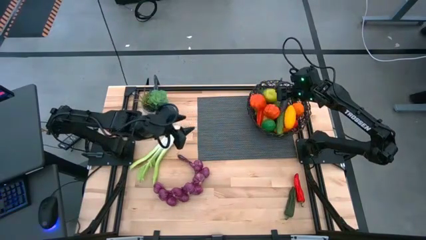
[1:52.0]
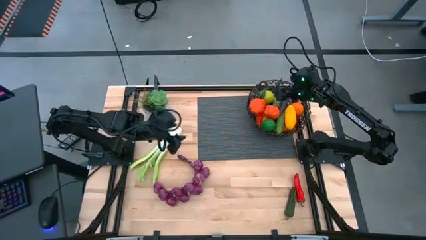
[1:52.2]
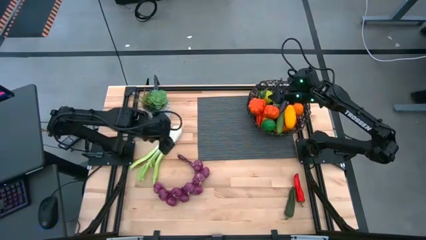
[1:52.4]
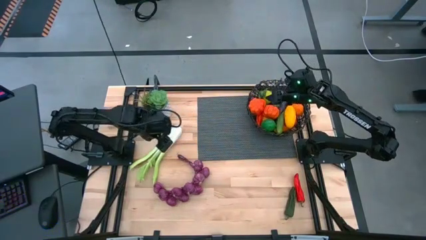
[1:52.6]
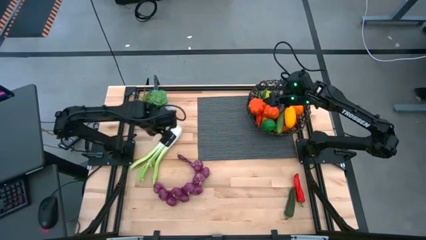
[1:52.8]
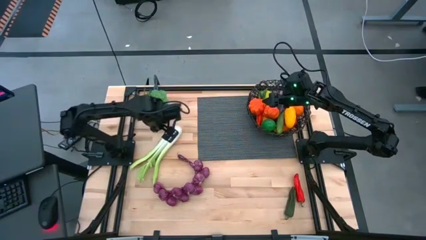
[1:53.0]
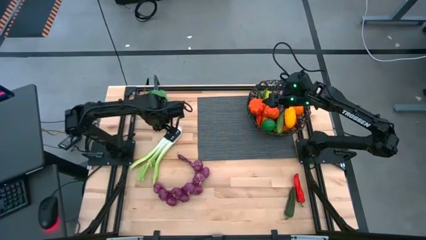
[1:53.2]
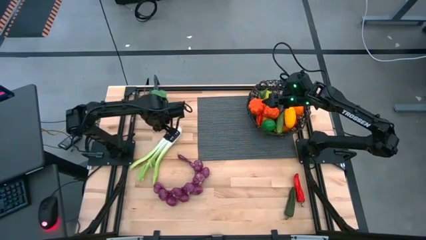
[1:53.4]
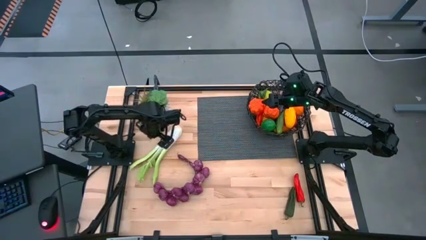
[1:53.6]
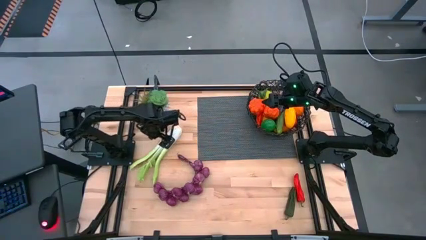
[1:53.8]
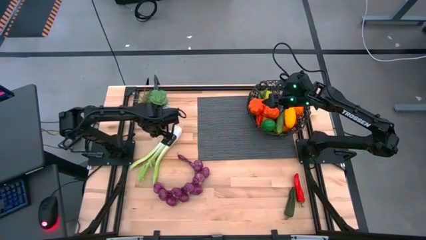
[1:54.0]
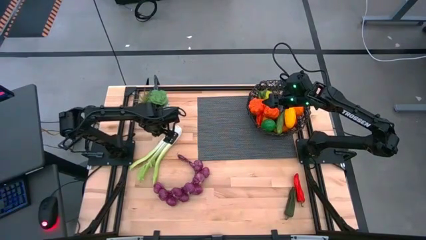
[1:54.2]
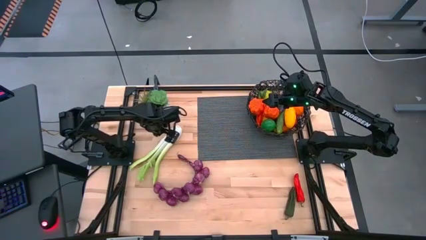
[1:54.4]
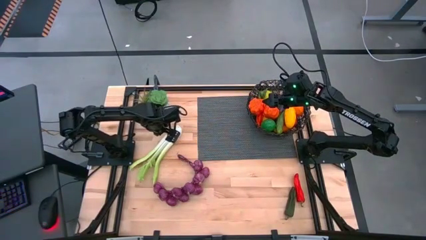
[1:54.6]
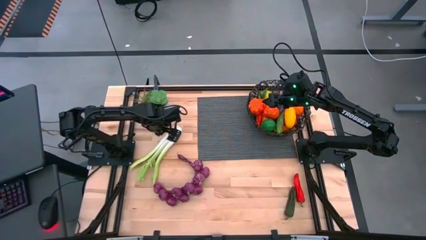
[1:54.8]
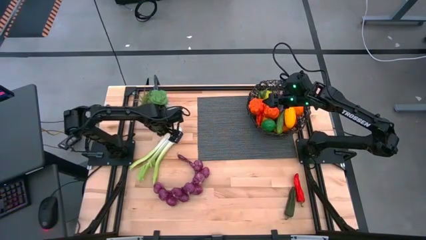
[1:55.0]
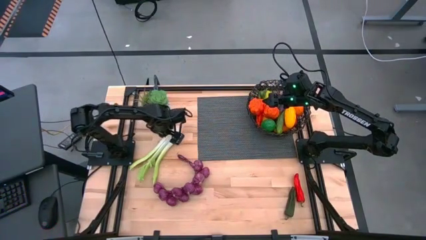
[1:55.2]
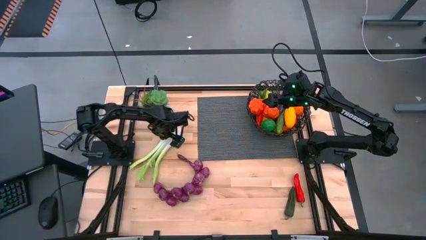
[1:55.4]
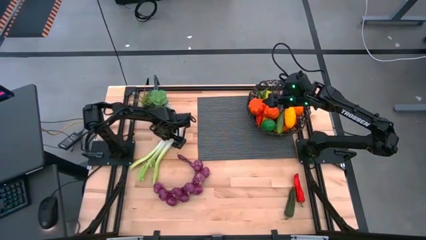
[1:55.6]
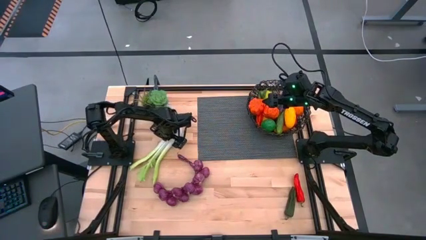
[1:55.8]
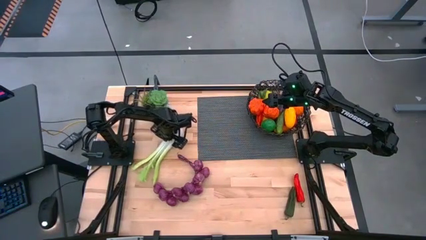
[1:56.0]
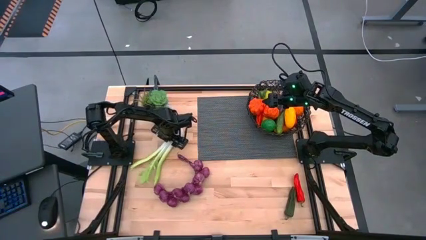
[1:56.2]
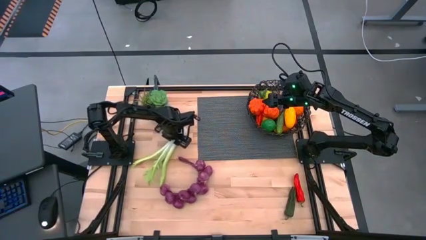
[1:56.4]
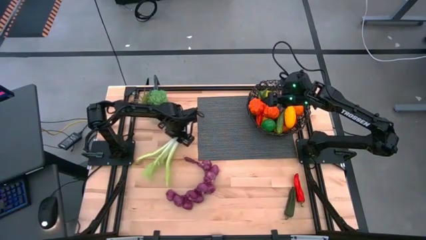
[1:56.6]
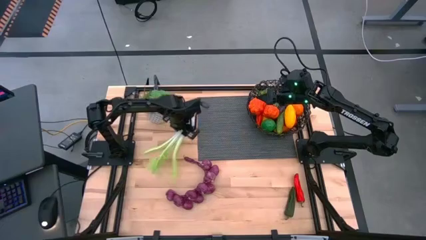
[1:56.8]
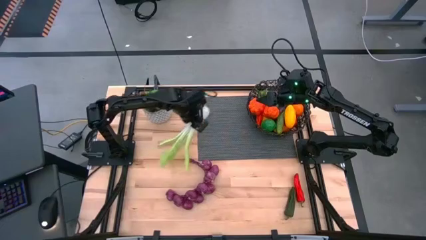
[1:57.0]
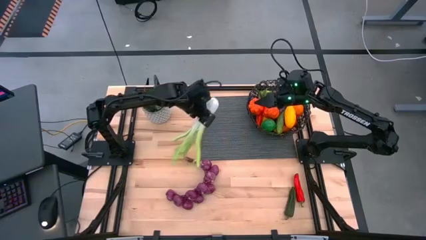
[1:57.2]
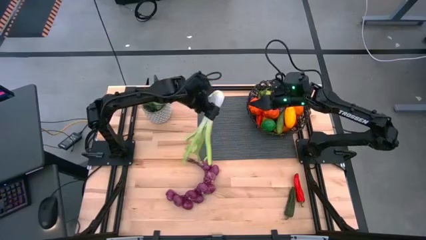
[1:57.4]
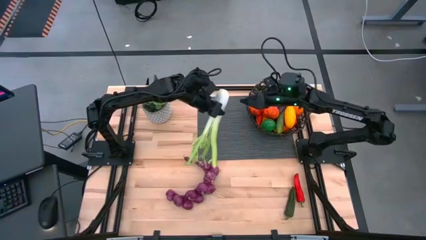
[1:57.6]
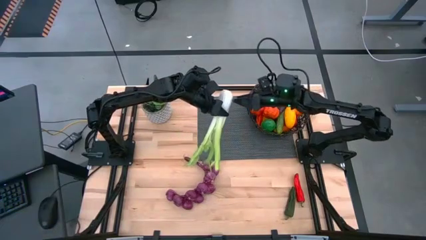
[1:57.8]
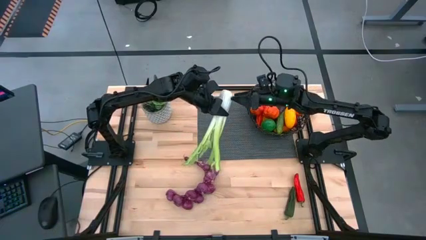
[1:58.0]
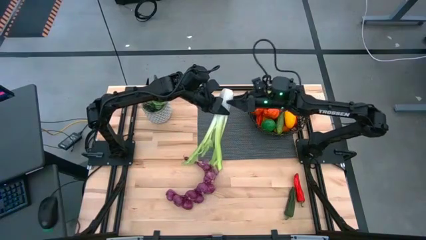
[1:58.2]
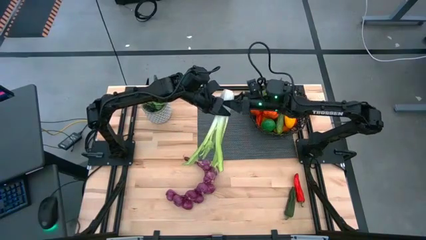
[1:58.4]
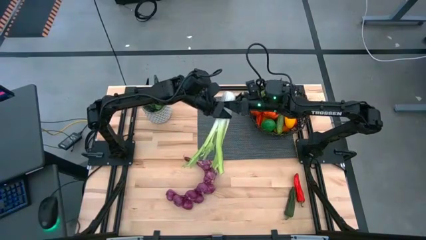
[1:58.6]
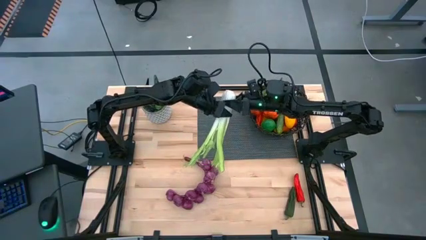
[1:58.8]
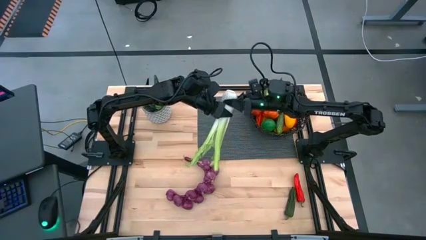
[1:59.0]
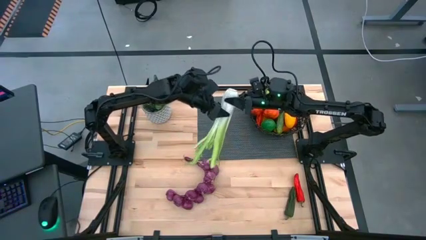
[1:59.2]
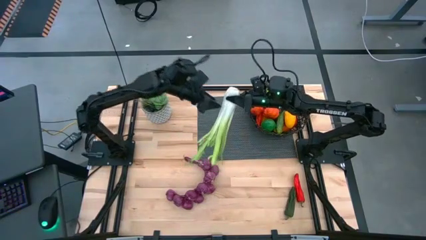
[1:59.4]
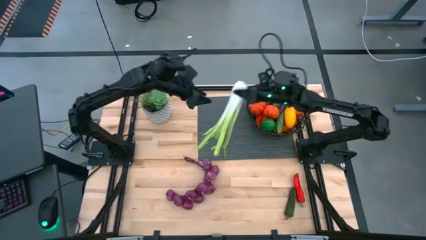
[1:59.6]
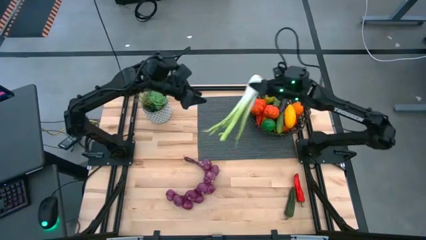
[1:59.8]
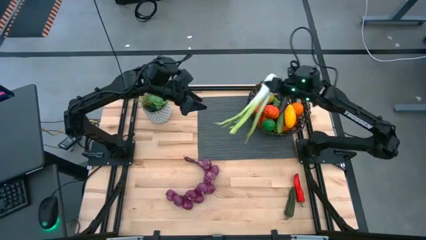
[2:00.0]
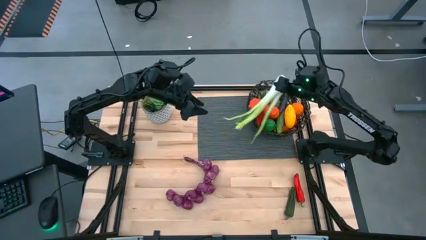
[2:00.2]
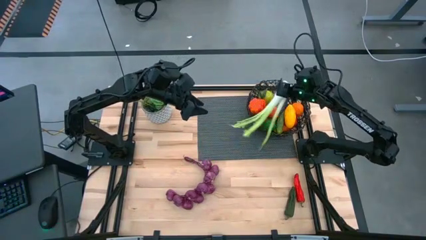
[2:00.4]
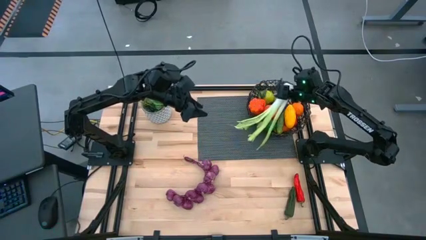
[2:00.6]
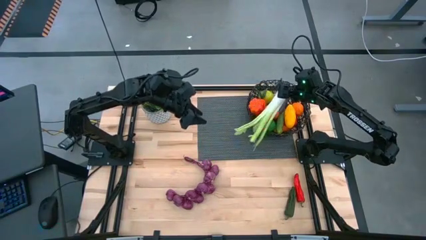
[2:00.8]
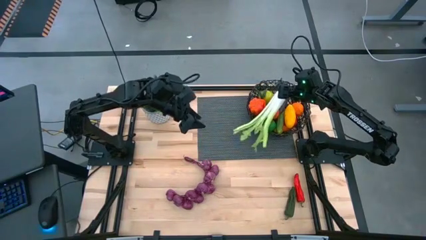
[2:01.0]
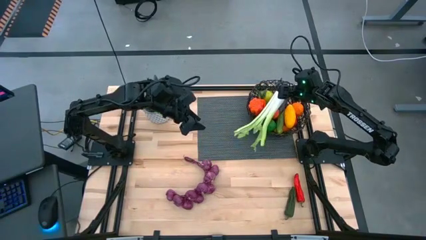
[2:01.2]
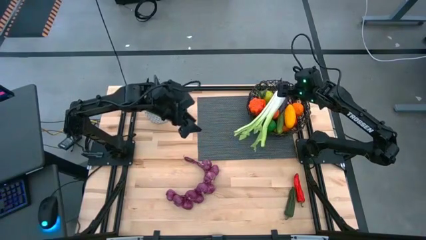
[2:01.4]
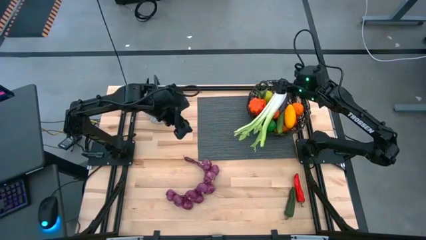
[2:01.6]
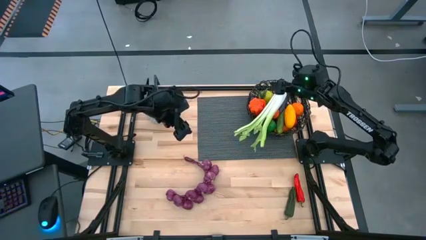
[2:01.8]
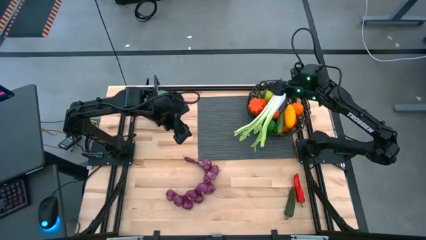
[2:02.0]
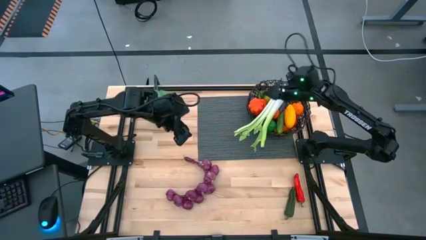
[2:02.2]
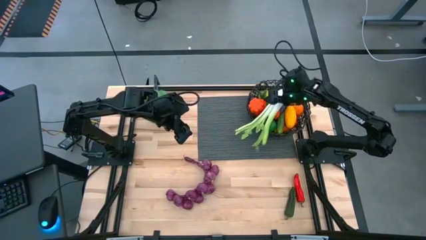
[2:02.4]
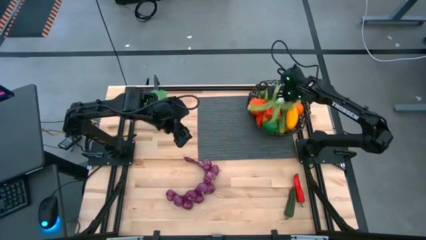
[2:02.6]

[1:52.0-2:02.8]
Task: Build produce basket
Put the green celery into the black basket

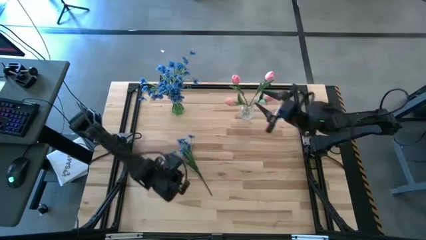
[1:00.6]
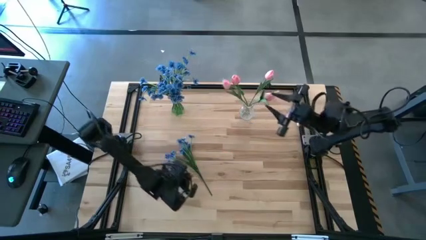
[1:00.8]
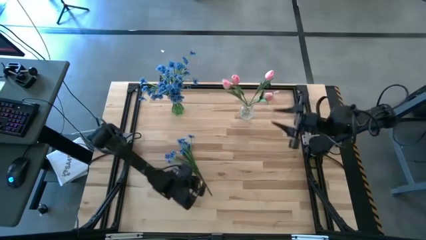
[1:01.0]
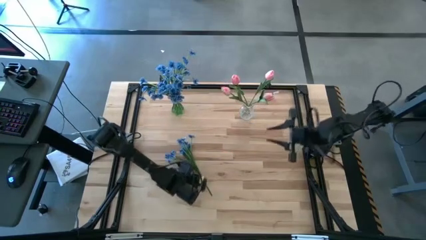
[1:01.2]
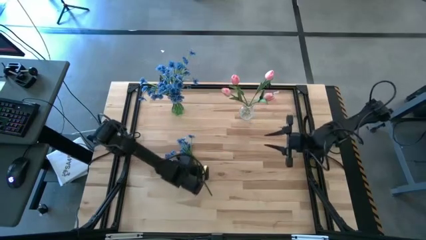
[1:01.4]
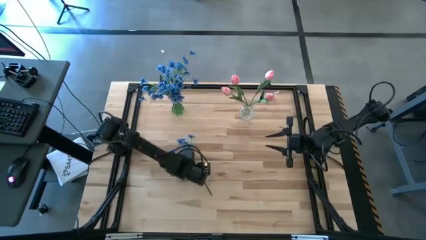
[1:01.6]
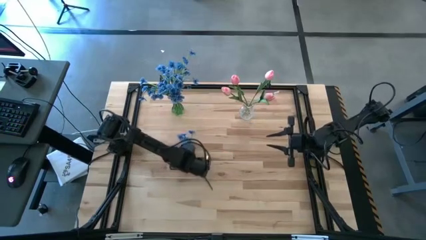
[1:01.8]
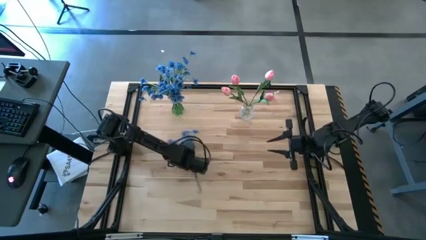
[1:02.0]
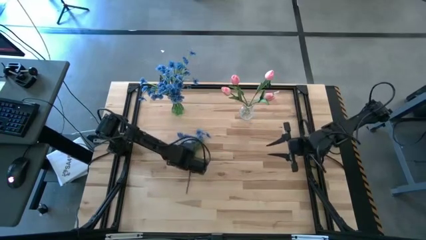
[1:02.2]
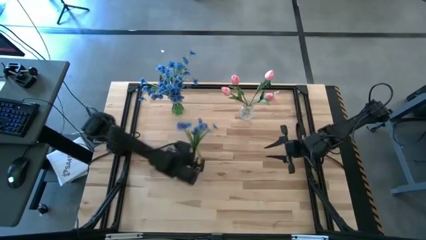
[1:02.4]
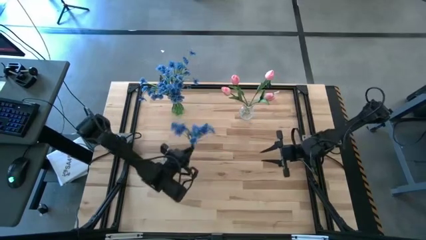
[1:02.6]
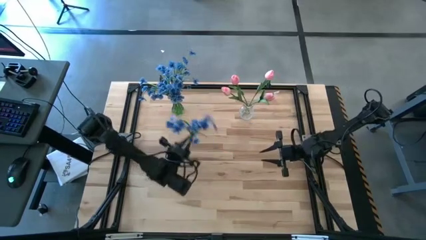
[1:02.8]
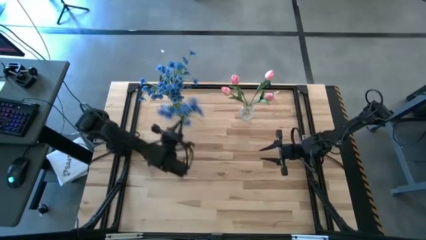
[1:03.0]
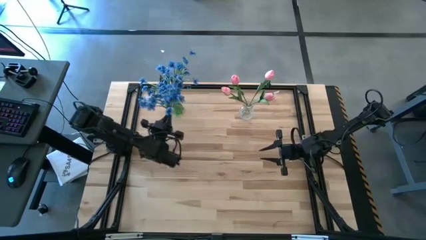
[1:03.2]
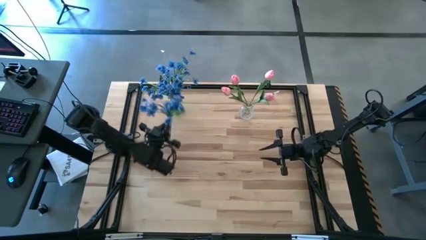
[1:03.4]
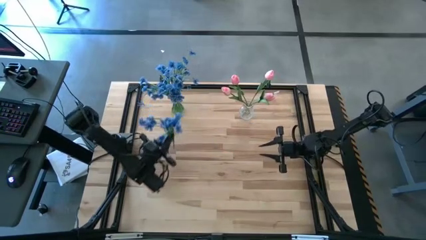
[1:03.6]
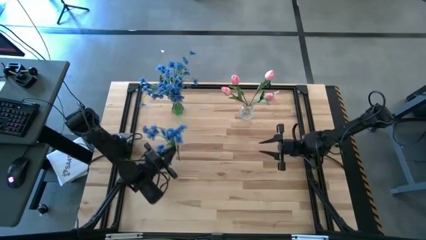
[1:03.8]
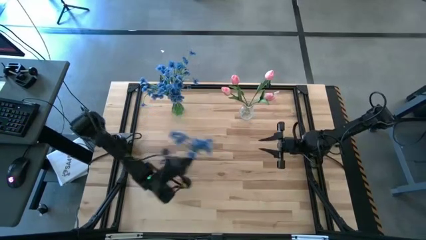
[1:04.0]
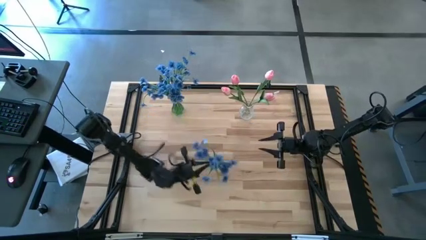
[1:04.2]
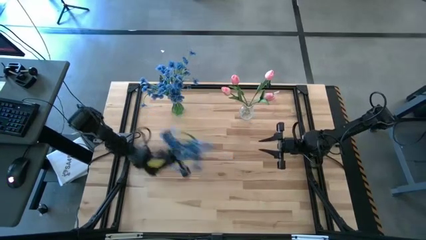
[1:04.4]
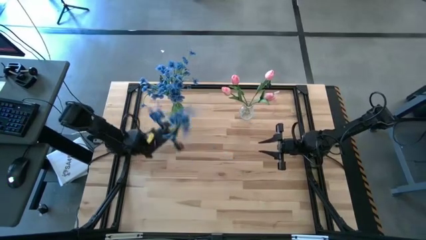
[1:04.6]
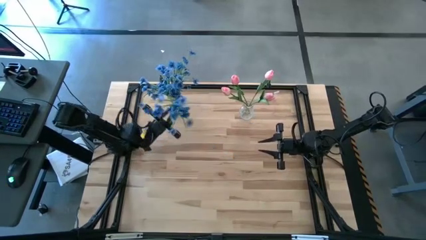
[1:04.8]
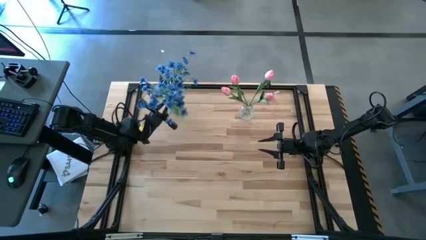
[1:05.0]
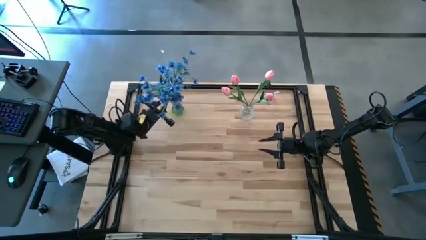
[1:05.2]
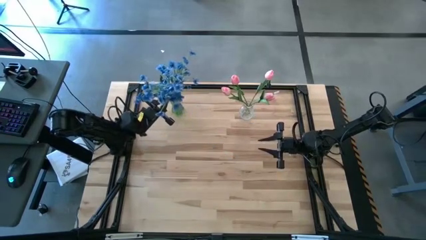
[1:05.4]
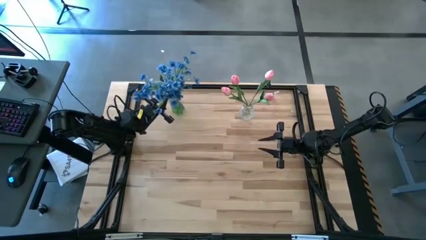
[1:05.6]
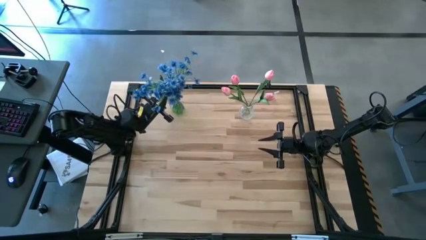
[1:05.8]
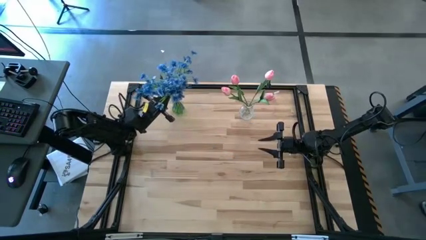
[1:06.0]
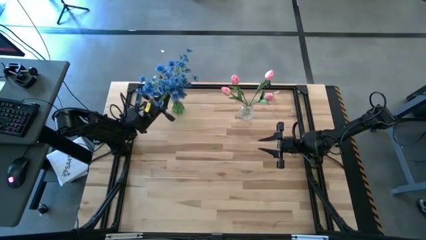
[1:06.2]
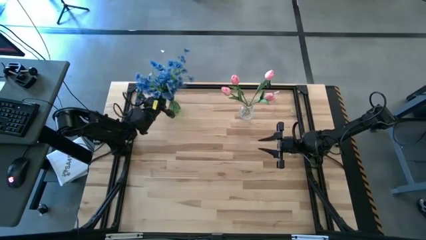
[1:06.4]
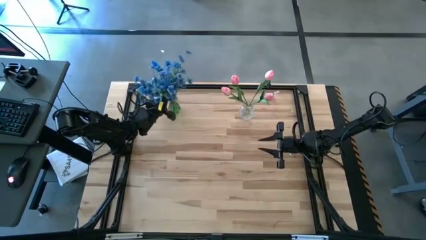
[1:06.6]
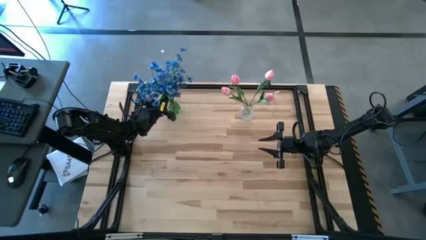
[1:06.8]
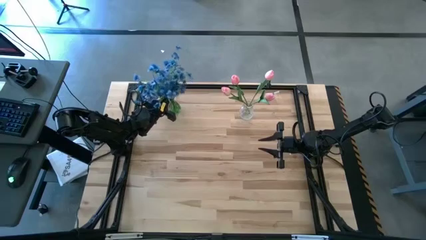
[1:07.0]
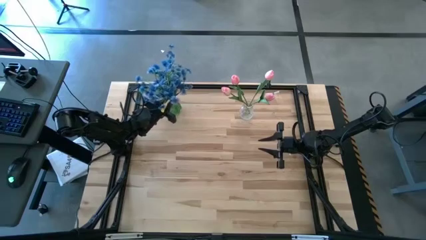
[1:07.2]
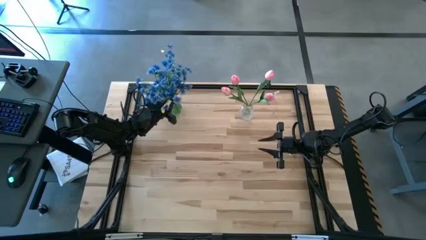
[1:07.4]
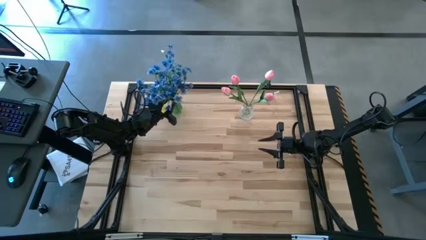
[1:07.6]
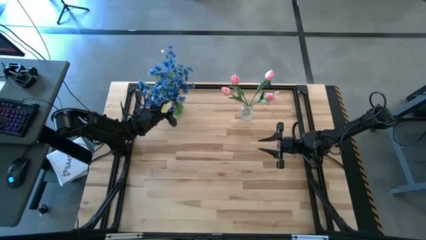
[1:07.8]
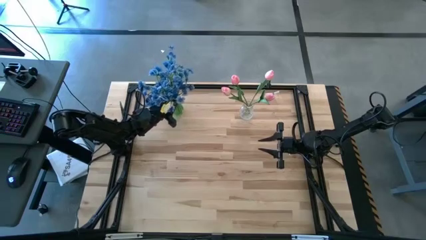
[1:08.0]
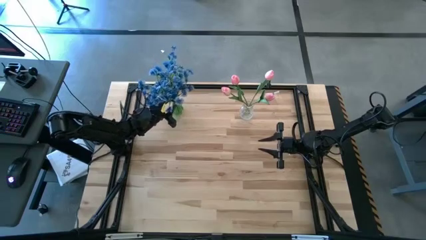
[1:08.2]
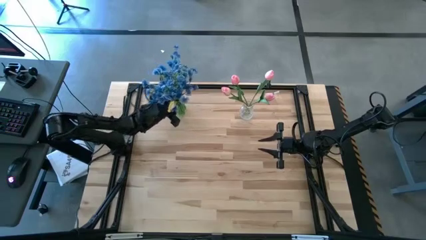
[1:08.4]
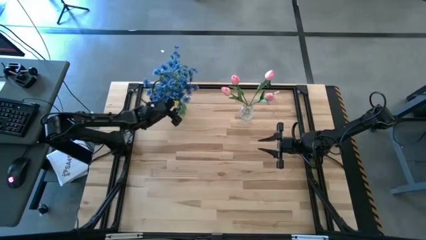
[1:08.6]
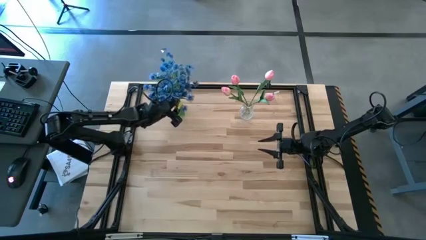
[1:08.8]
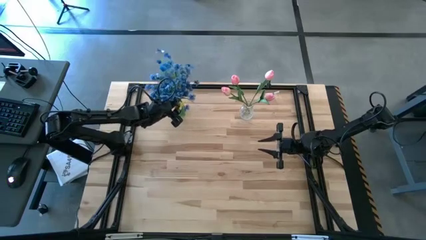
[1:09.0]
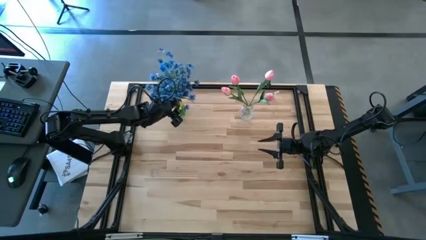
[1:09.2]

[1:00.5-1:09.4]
Task: Sort flowers into vase by color
Put the blue flowers into the green vase
